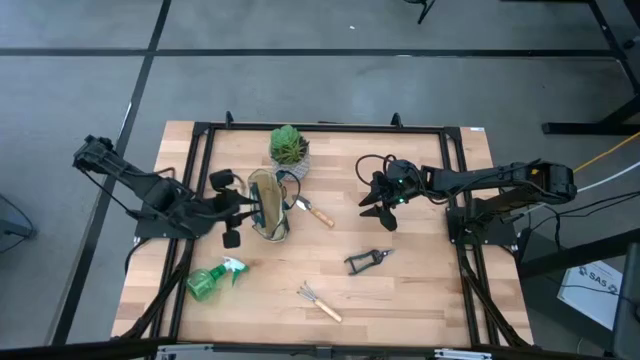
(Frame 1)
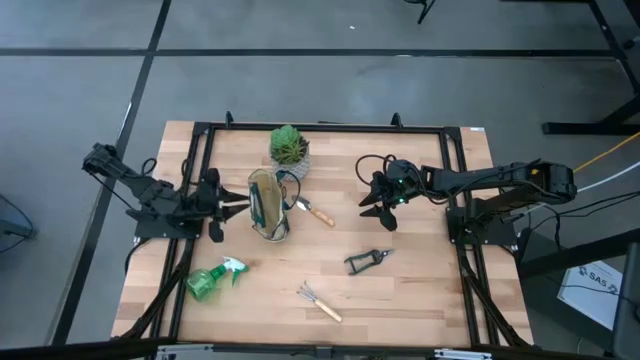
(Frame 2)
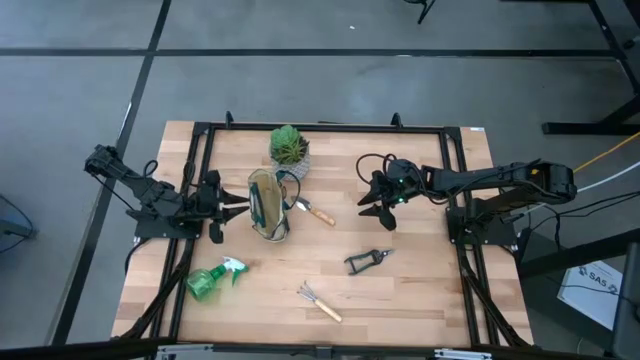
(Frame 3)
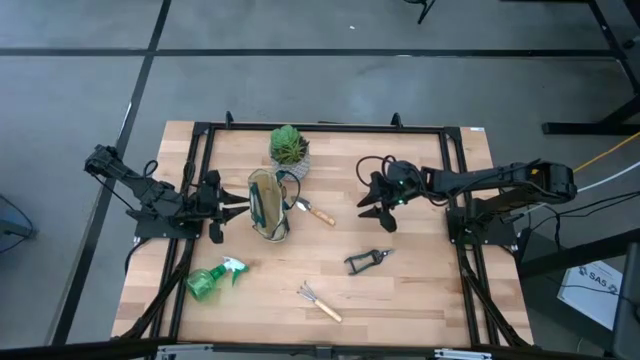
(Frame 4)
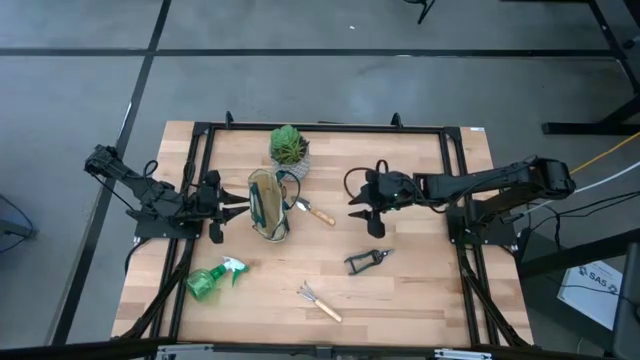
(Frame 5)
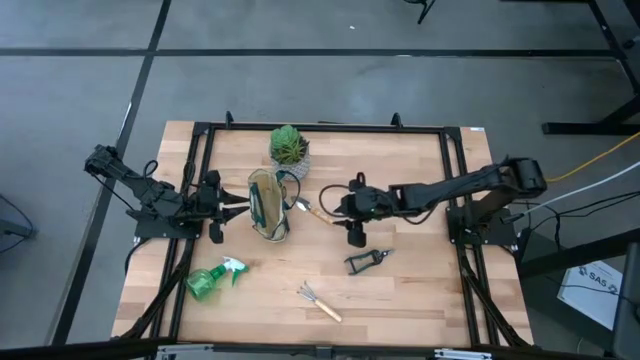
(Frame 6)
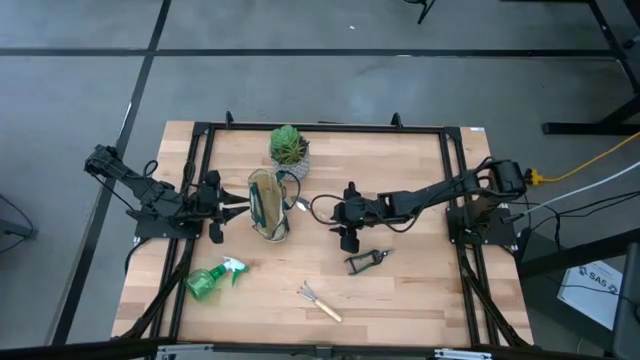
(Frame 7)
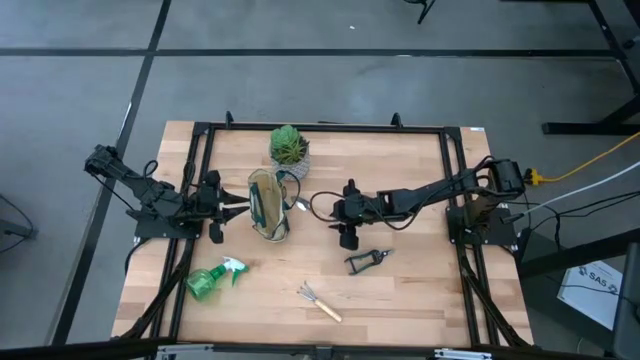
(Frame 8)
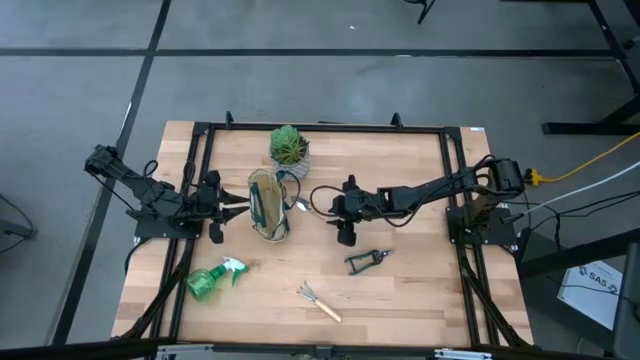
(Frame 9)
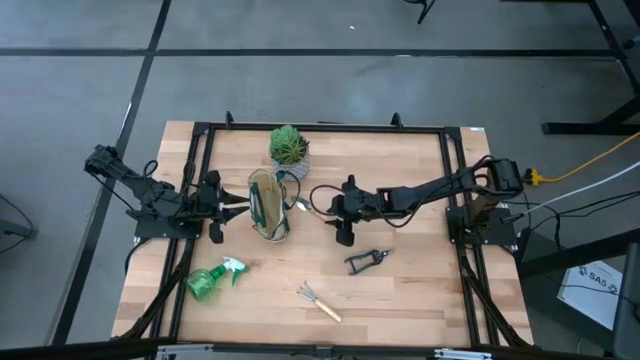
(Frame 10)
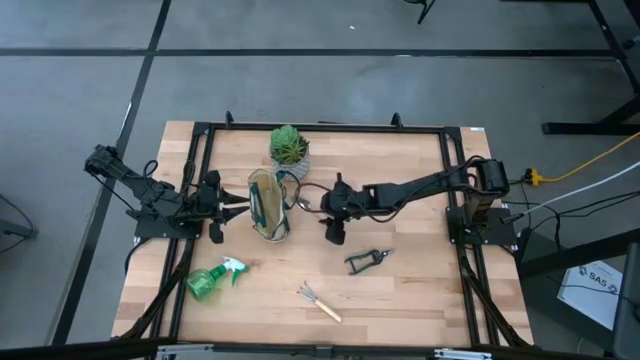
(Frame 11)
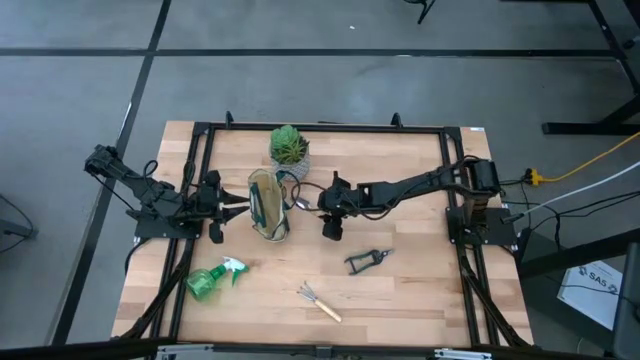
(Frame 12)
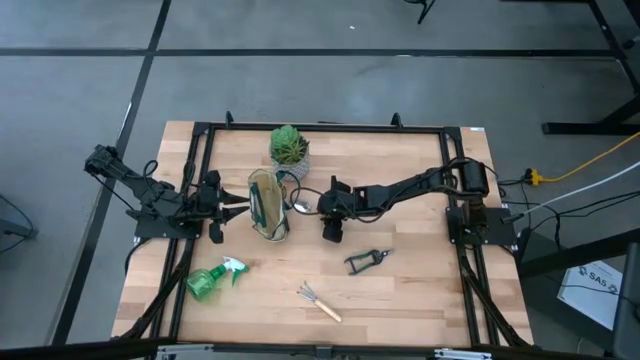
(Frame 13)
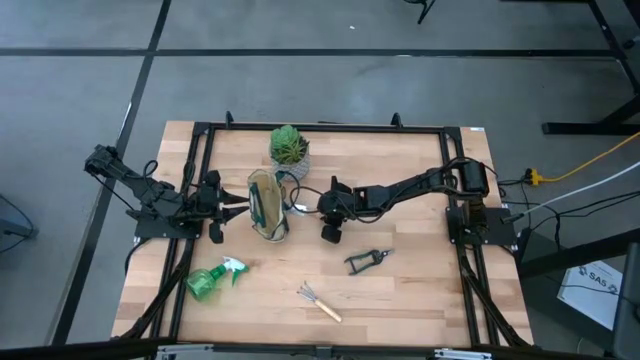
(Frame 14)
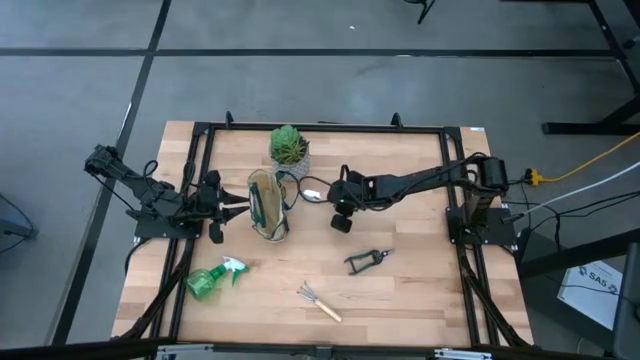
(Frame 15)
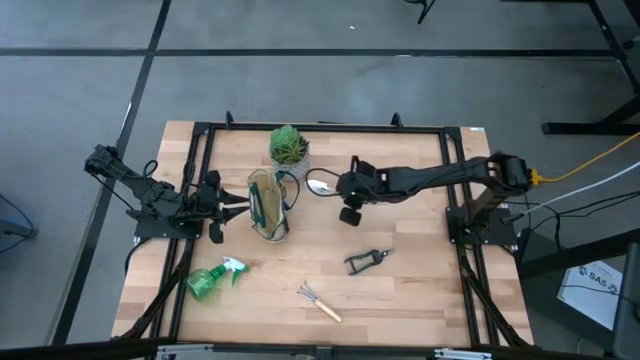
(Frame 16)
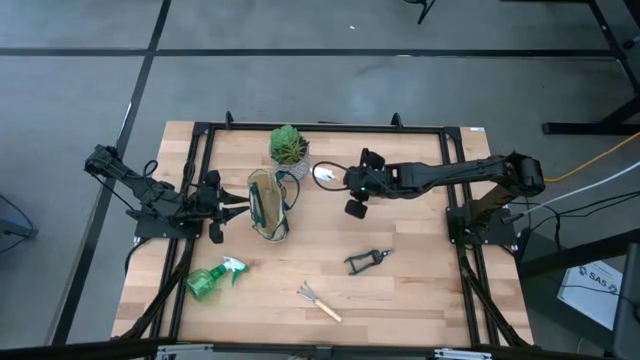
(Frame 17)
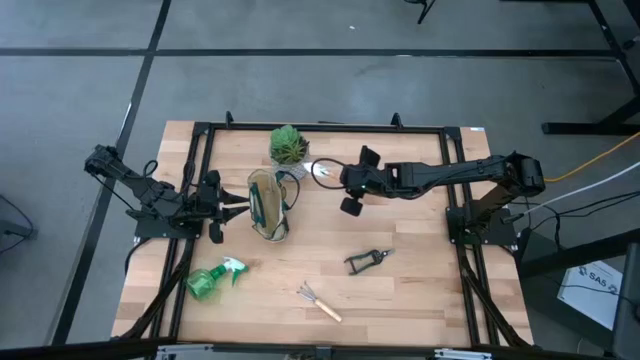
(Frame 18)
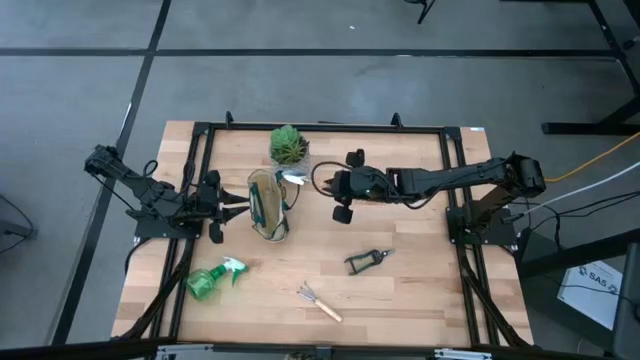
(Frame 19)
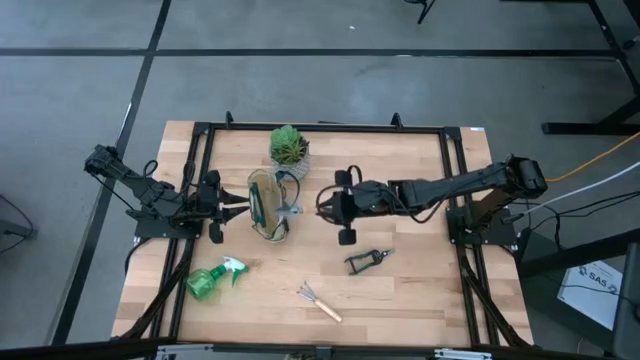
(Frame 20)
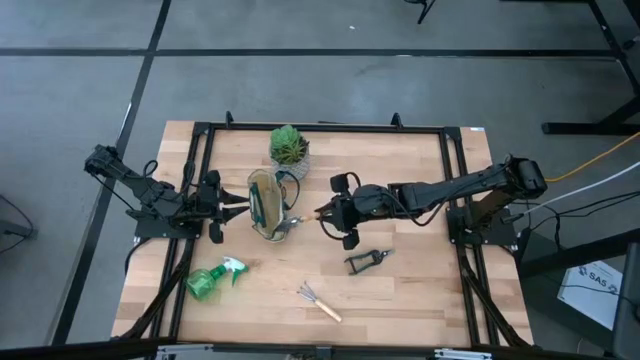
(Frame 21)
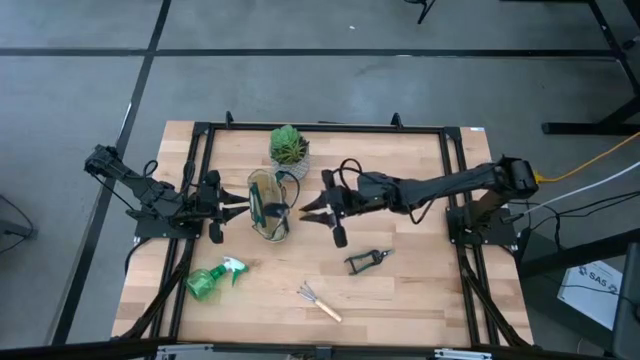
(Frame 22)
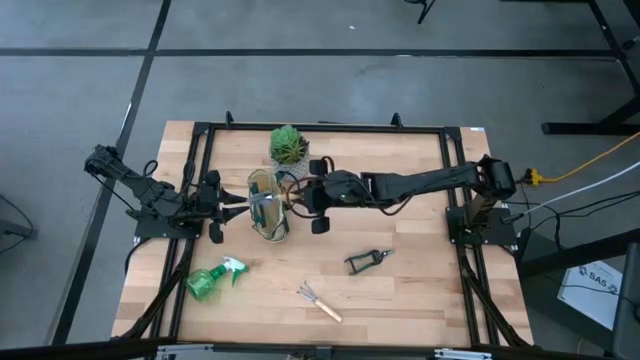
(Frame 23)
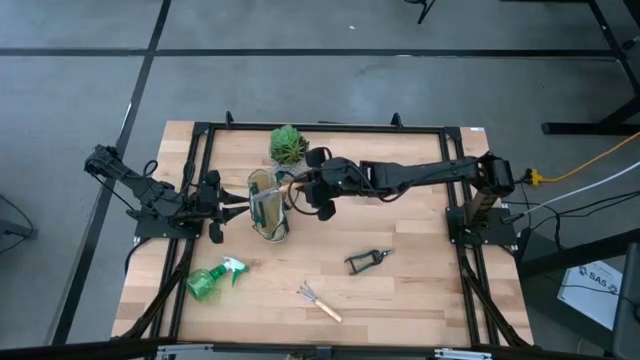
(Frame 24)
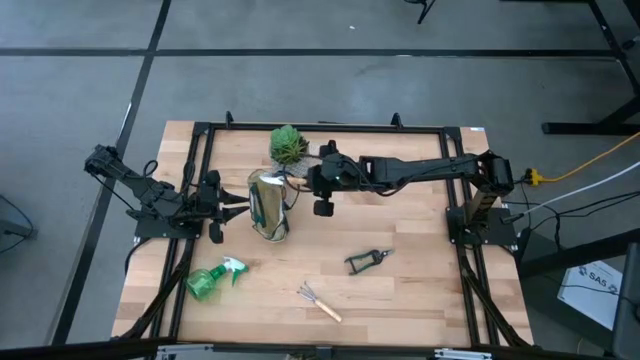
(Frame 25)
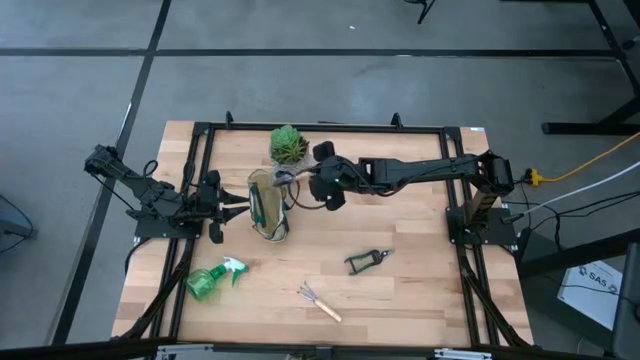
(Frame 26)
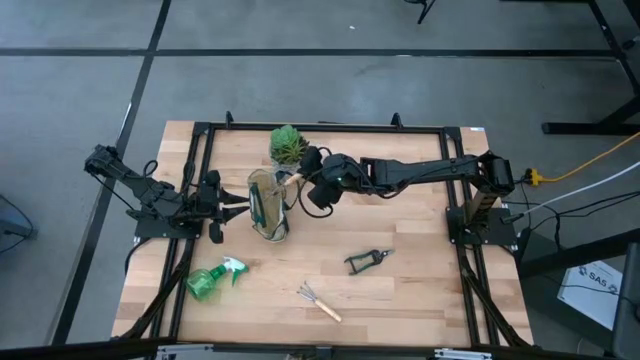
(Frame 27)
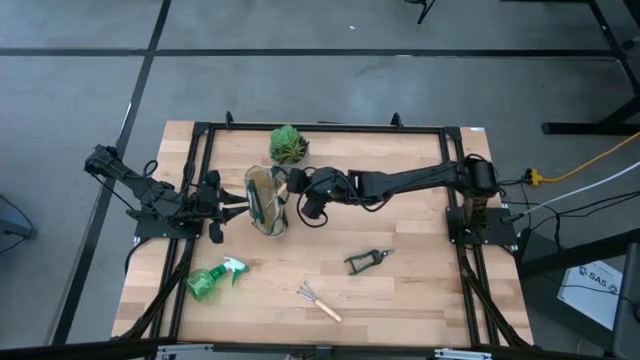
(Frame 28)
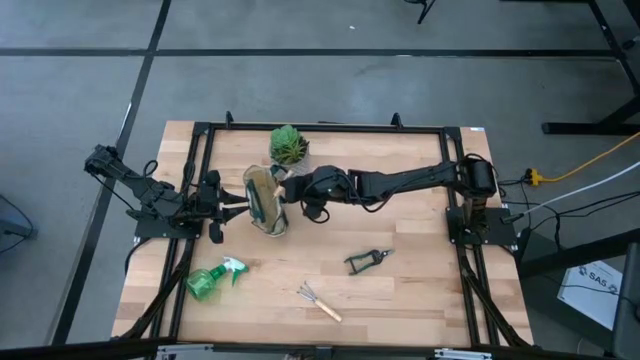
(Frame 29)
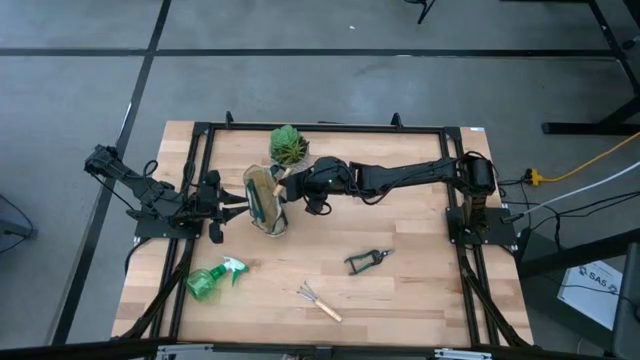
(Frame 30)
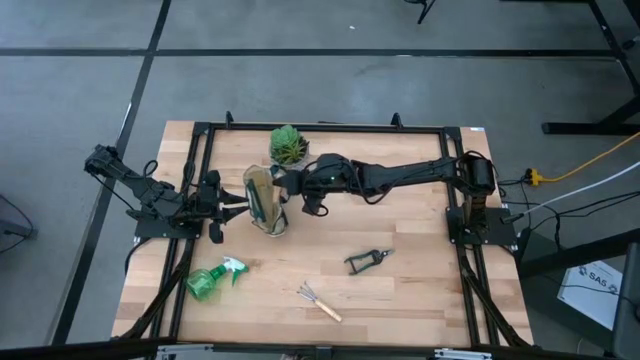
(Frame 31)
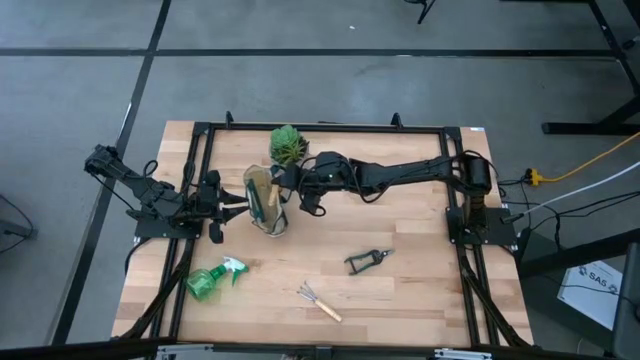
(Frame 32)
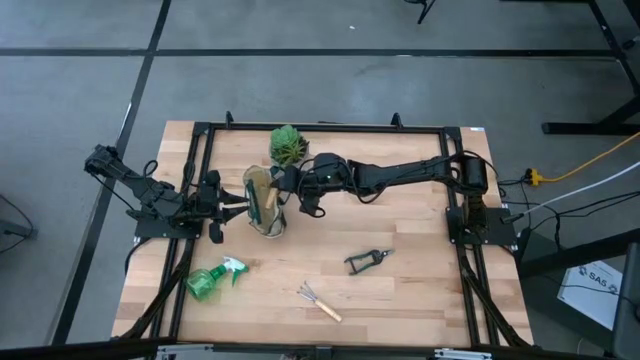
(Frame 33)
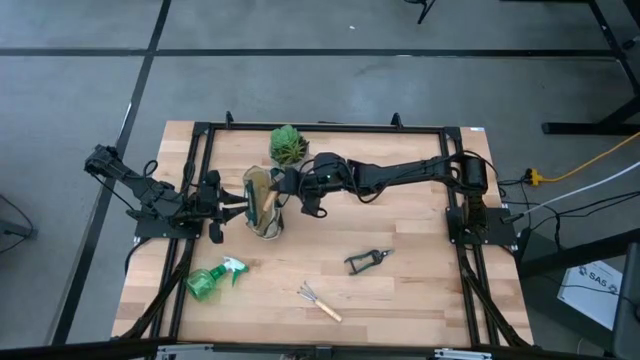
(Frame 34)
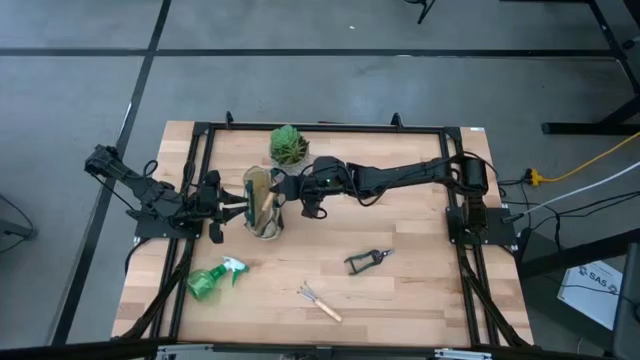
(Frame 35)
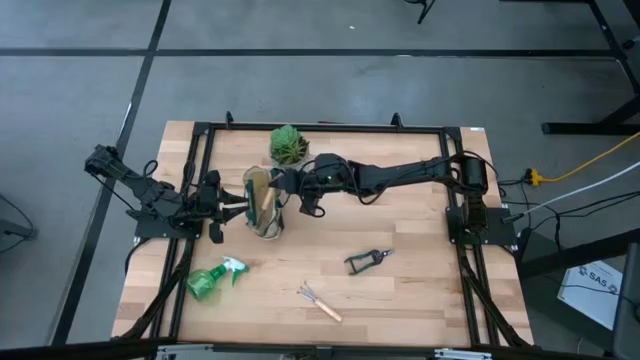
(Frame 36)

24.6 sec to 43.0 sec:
Task: Pick & Place Garden tools in Gardening bag
Put the trowel into the gardening bag

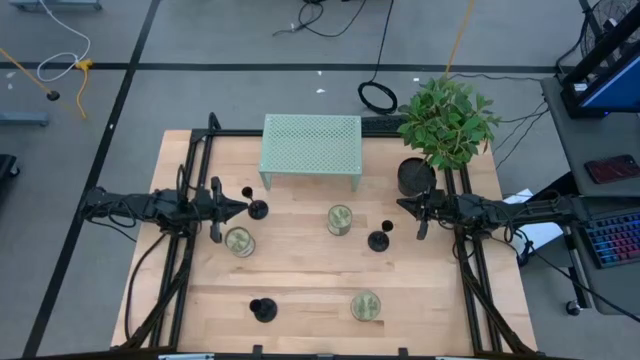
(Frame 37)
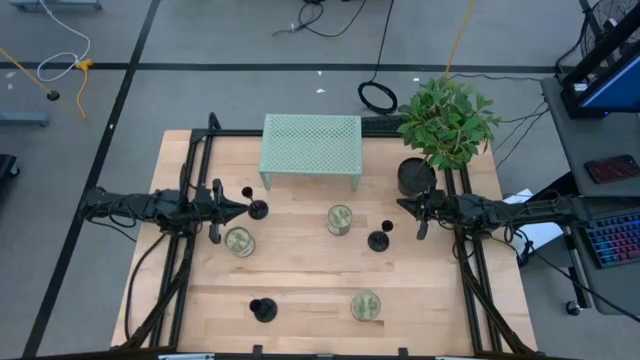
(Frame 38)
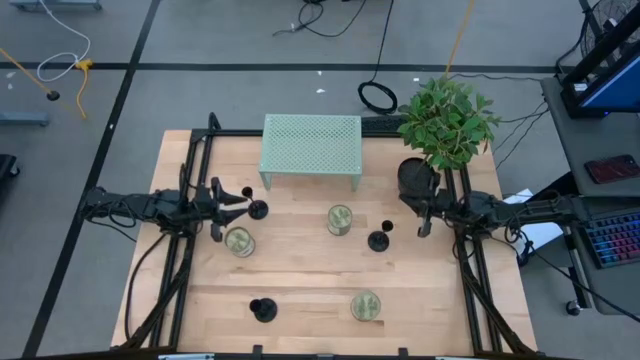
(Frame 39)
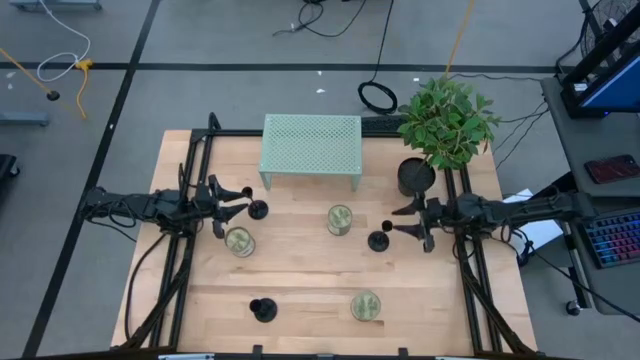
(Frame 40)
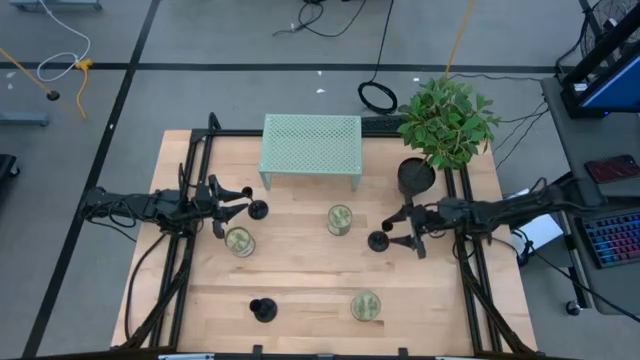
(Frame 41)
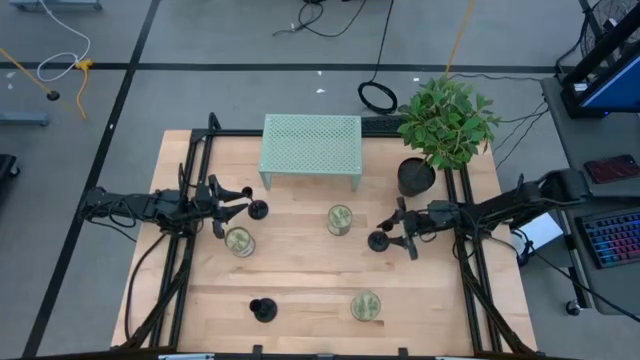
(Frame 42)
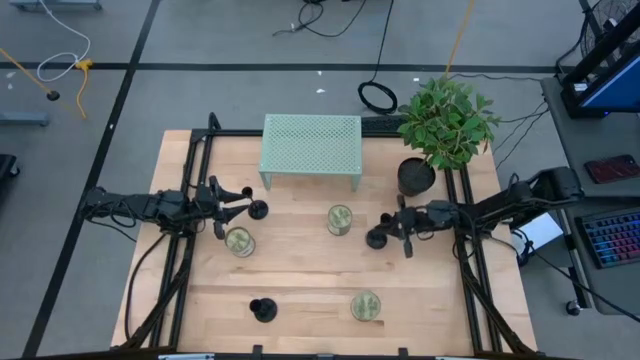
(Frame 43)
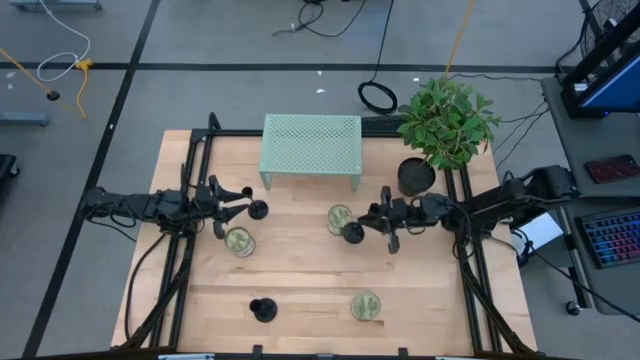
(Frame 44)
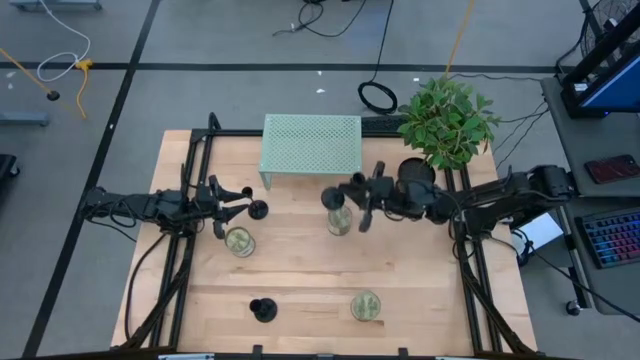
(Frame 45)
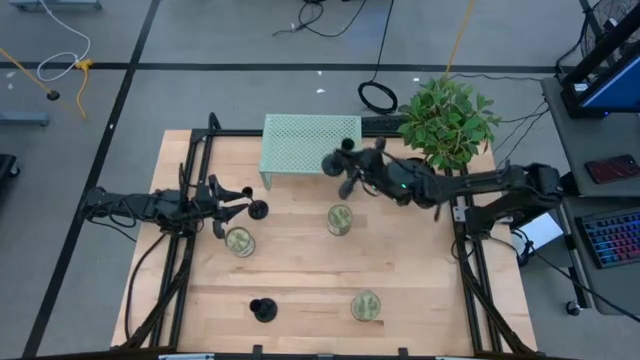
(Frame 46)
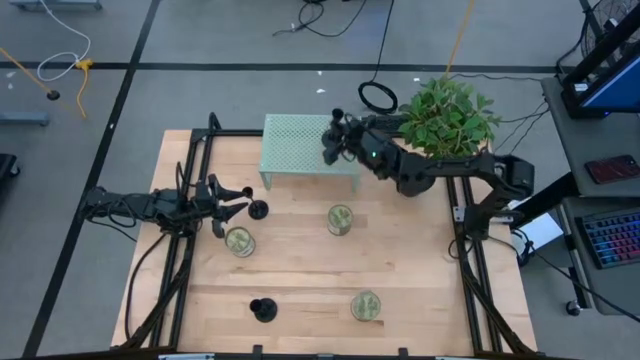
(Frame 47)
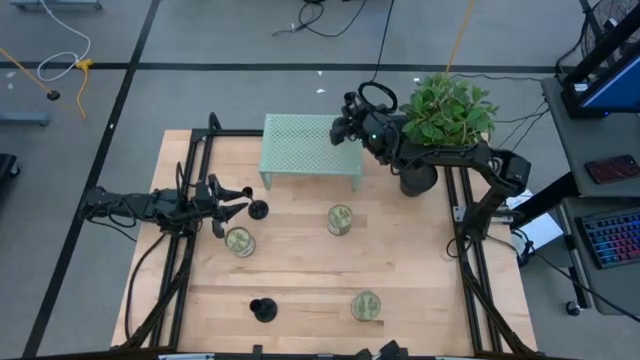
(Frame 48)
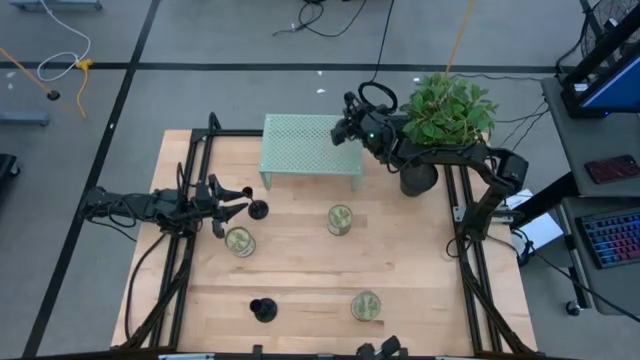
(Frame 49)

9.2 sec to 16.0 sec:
Task: Pick & Place candle stick holders
Put the middle black candle holder on the shelf
